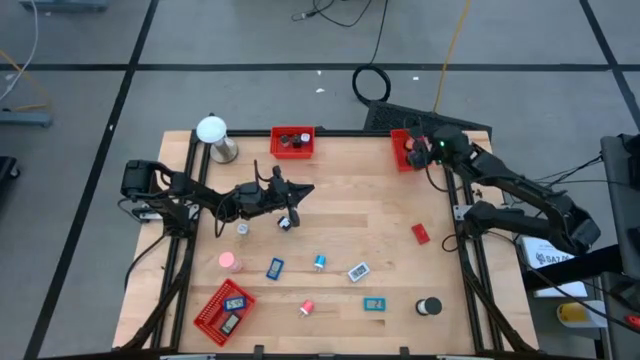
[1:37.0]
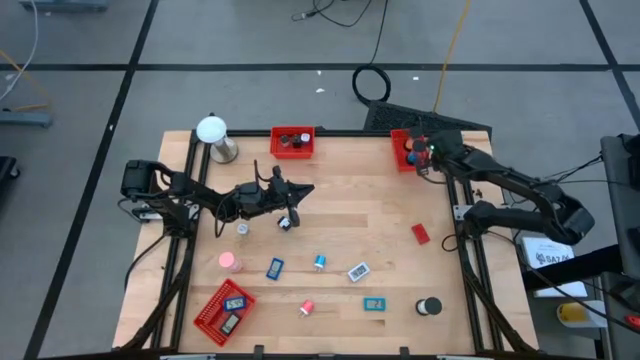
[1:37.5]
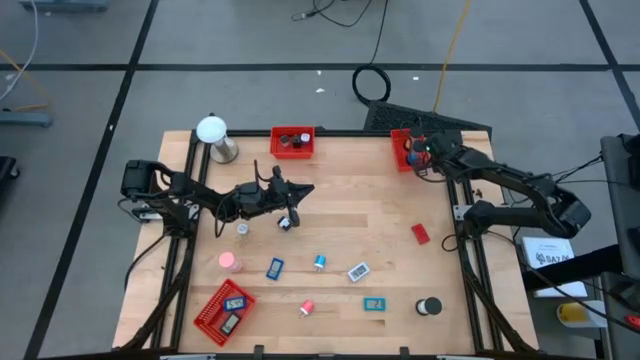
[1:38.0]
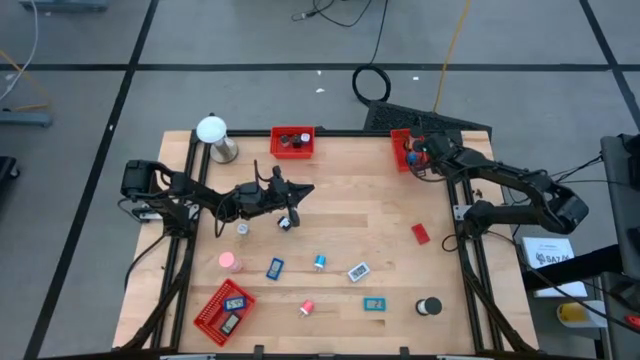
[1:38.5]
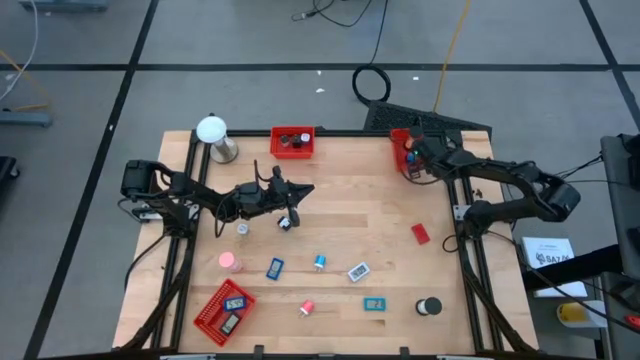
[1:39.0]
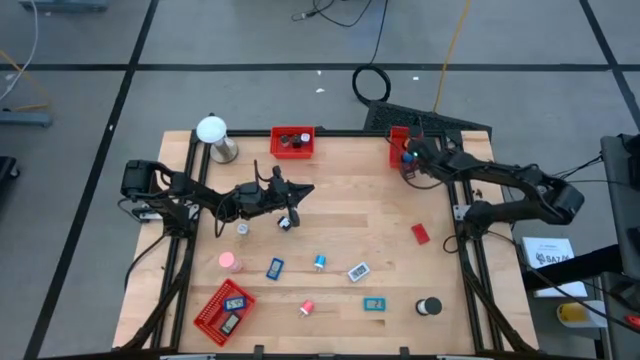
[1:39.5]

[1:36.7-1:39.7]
Task: Pick & Place Office items
Adjust the top right red basket

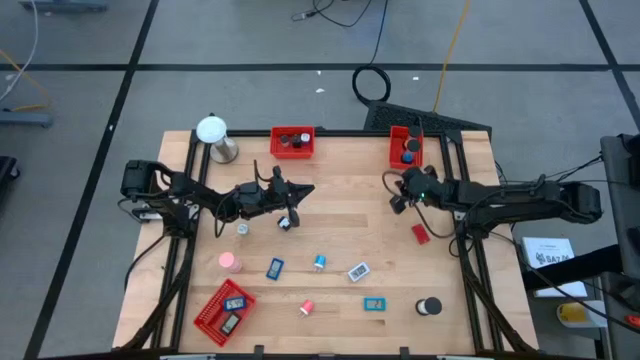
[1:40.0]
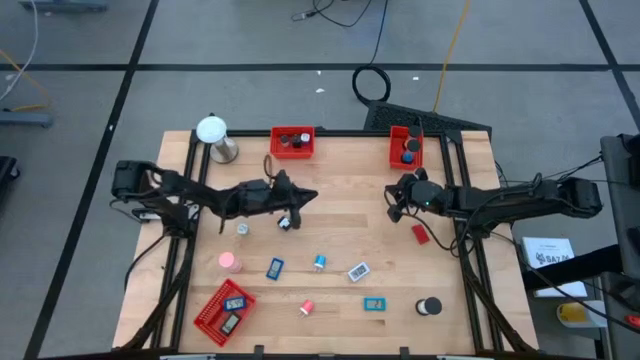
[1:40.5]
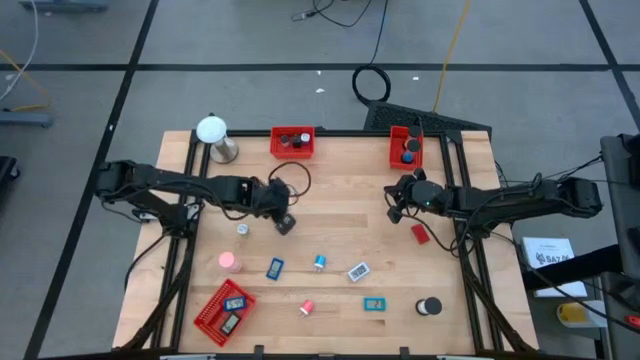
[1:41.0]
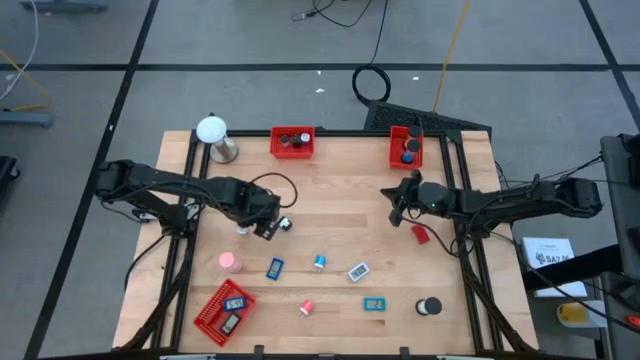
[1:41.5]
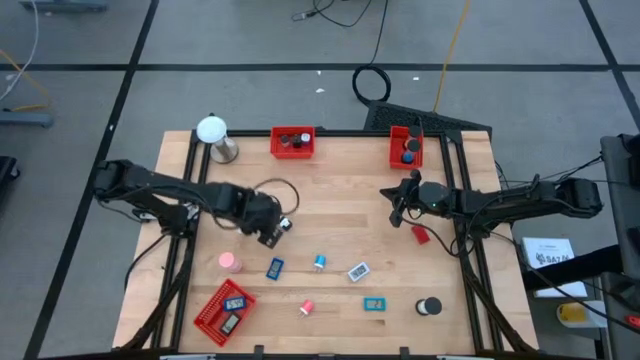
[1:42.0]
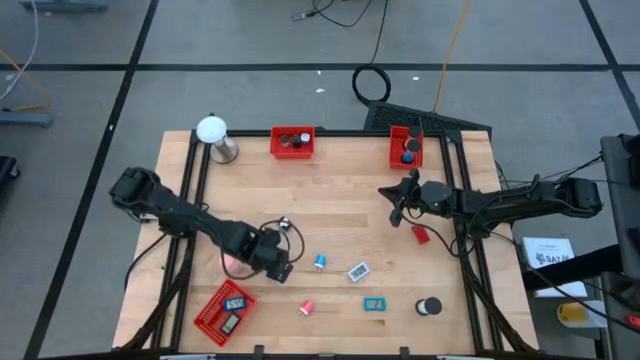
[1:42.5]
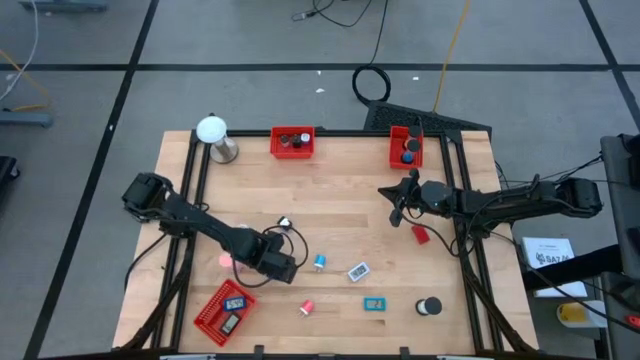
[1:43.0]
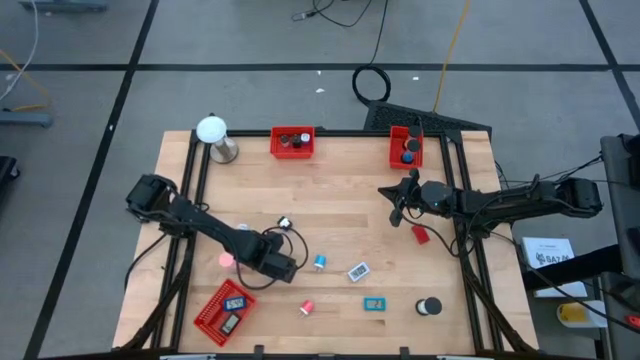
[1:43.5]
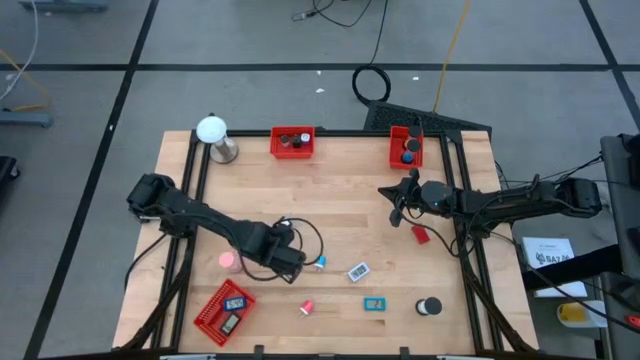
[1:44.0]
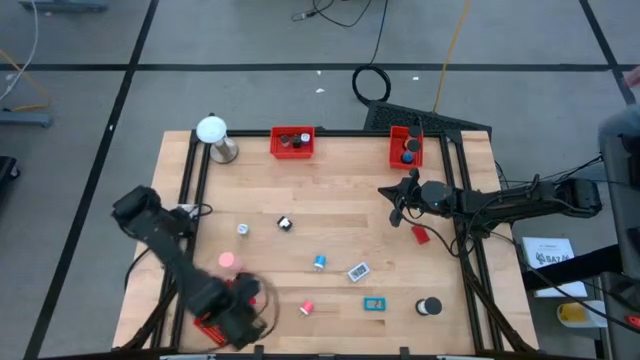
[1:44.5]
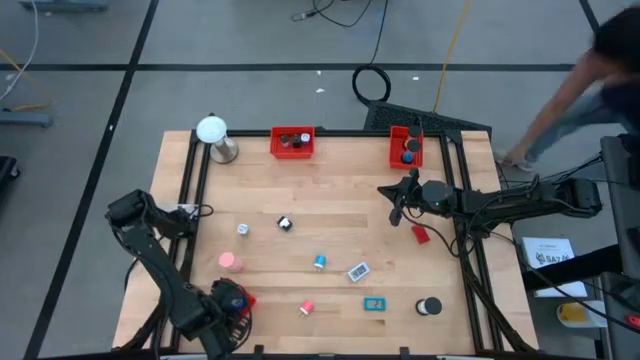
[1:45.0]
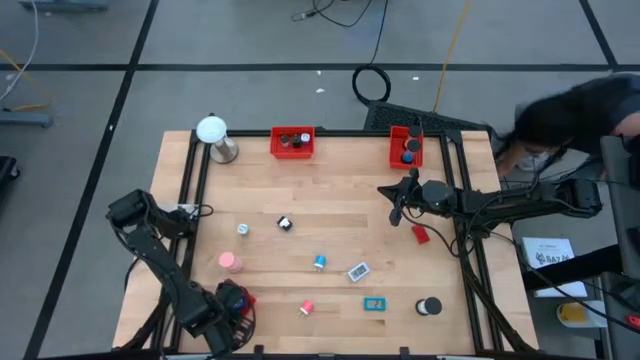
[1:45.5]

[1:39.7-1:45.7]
Put the dark blue timer into the bottom red basket

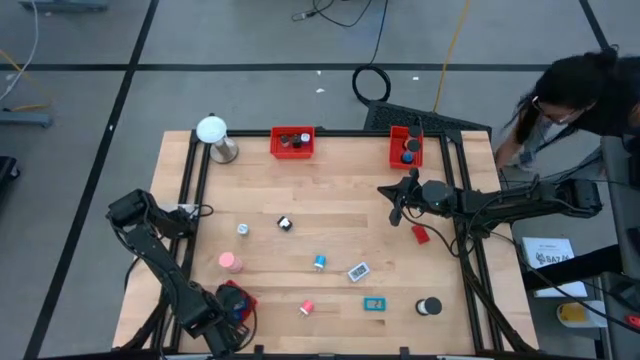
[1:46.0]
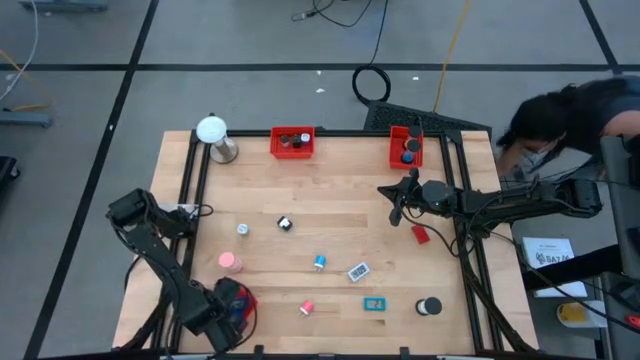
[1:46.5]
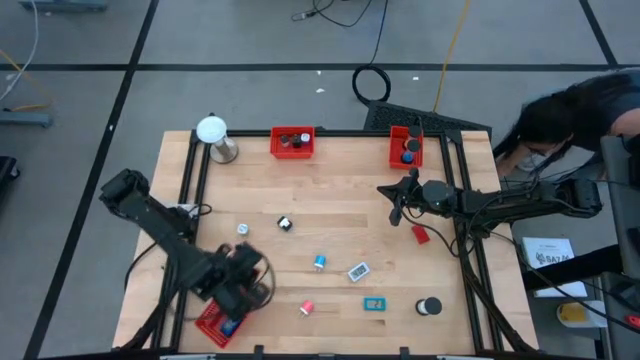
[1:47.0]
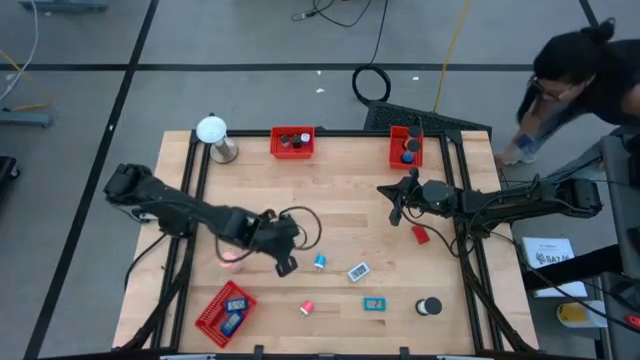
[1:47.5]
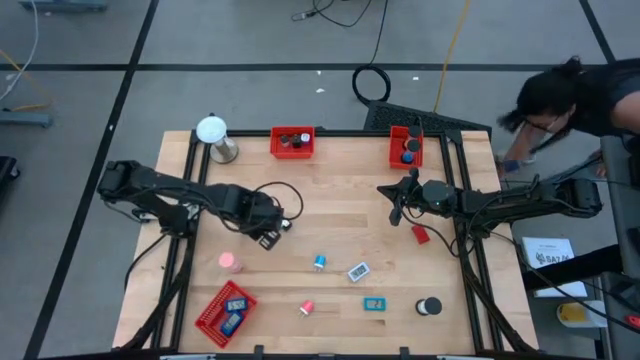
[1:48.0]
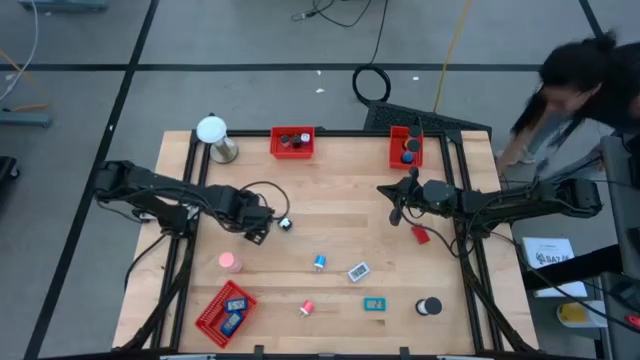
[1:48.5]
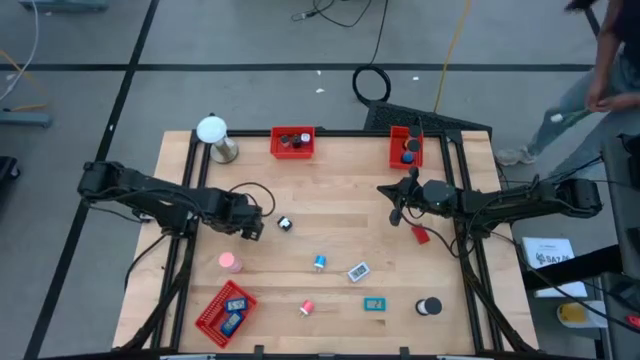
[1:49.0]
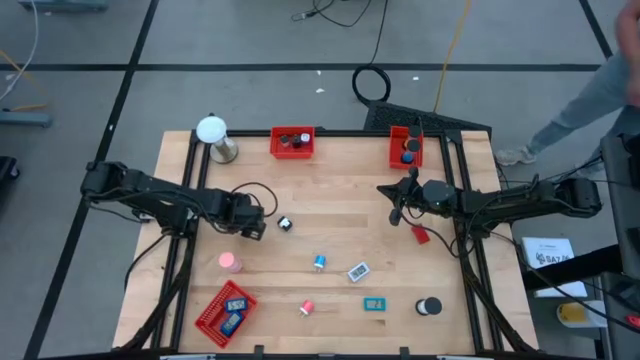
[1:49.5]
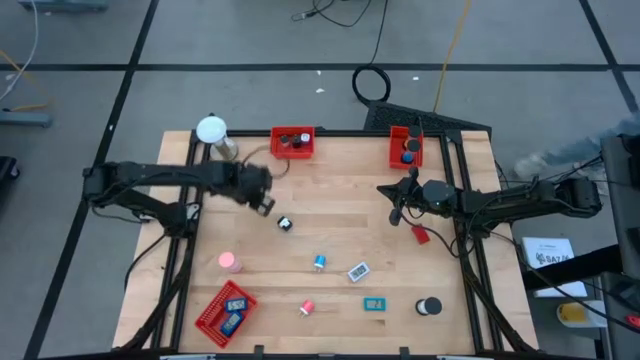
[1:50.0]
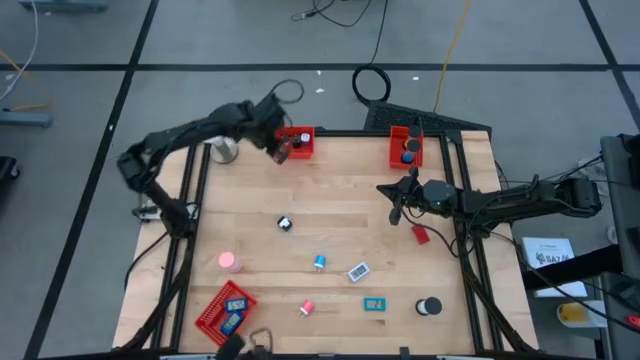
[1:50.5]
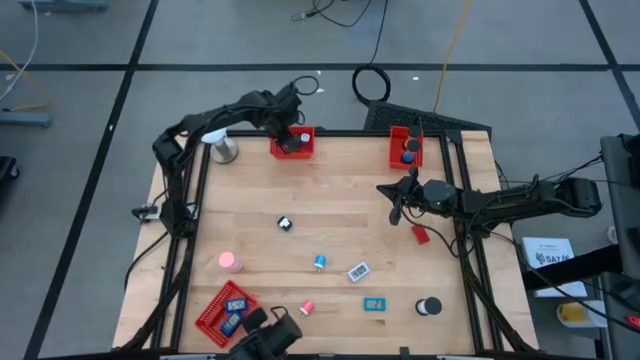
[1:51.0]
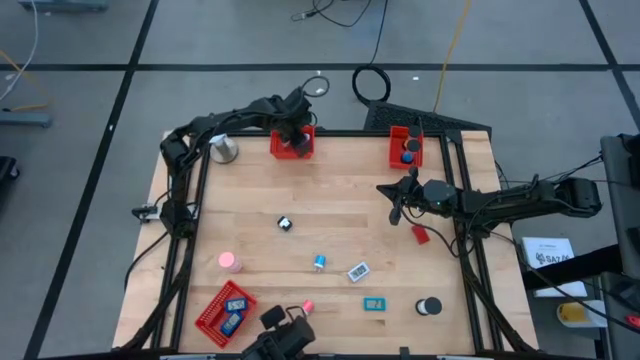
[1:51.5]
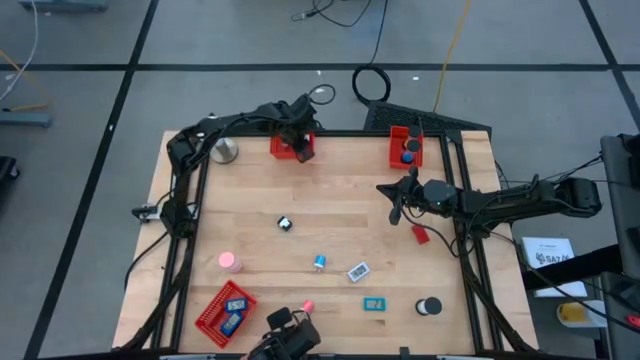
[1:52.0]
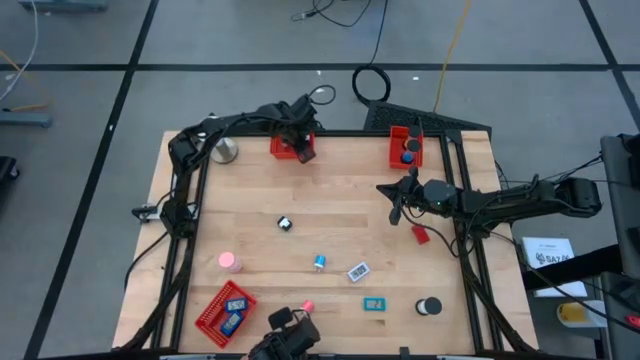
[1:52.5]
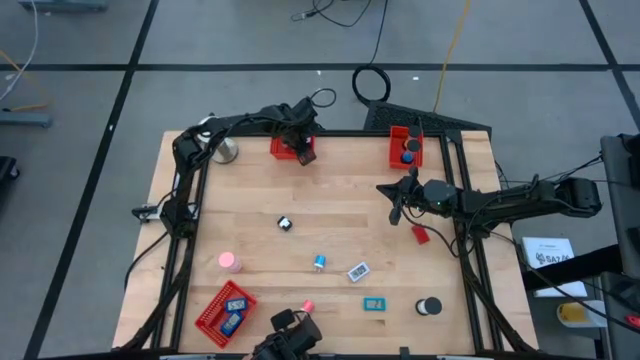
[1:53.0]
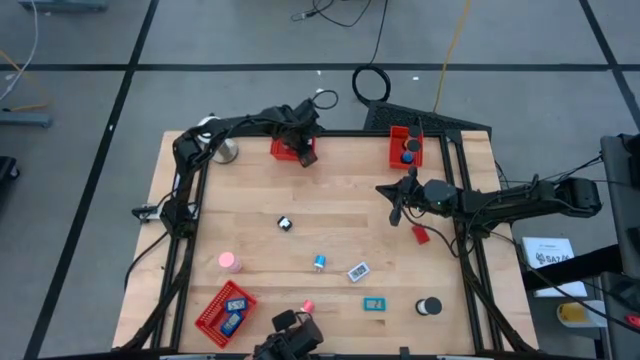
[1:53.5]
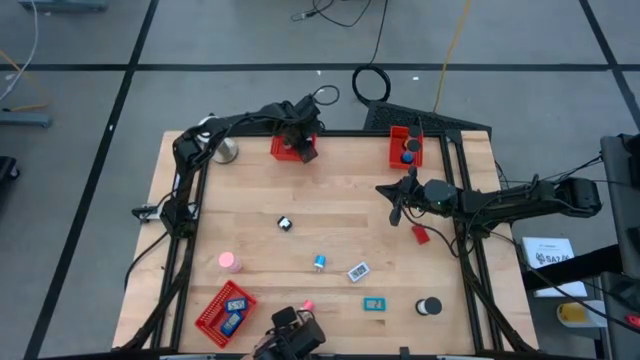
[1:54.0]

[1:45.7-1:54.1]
Put the green charger adapter into the top left red basket

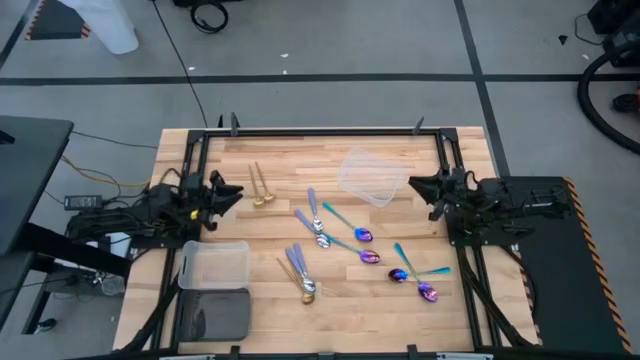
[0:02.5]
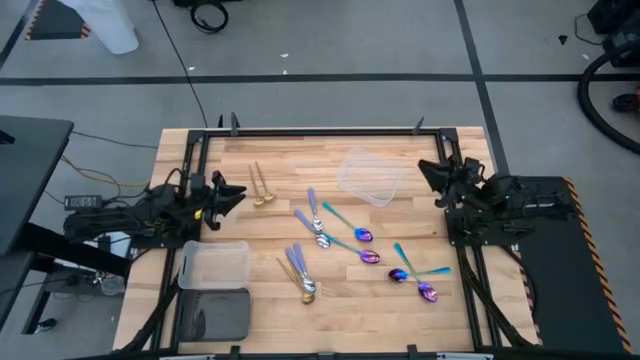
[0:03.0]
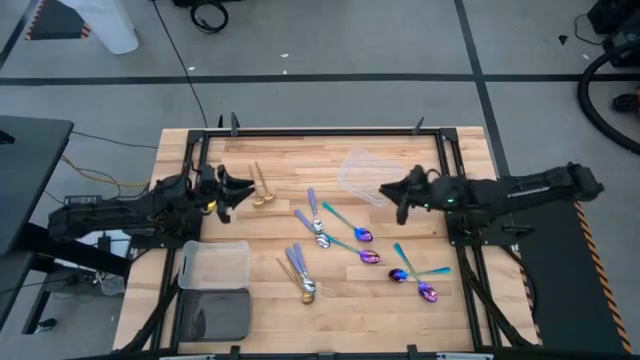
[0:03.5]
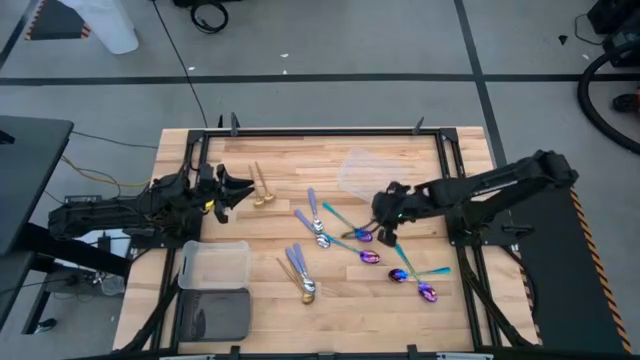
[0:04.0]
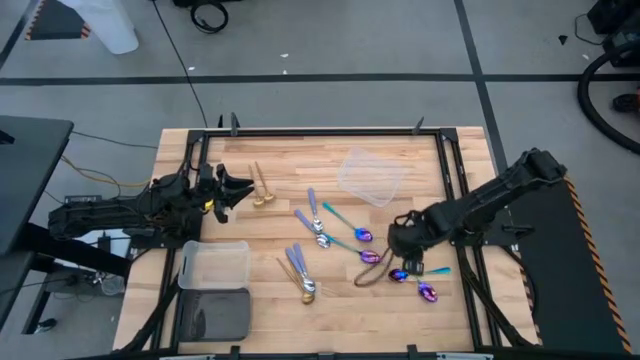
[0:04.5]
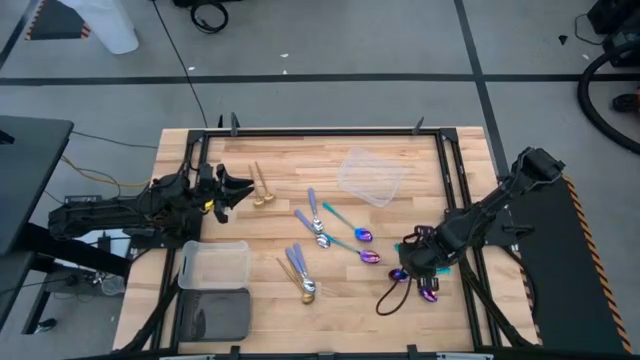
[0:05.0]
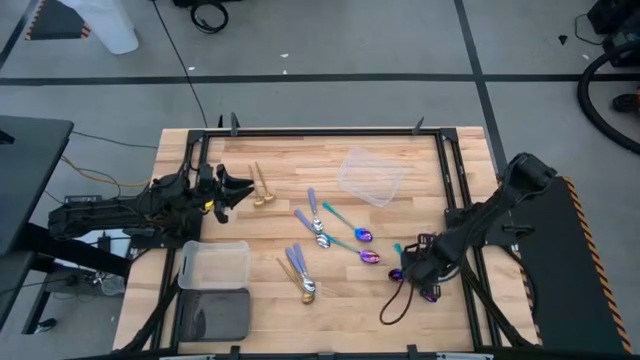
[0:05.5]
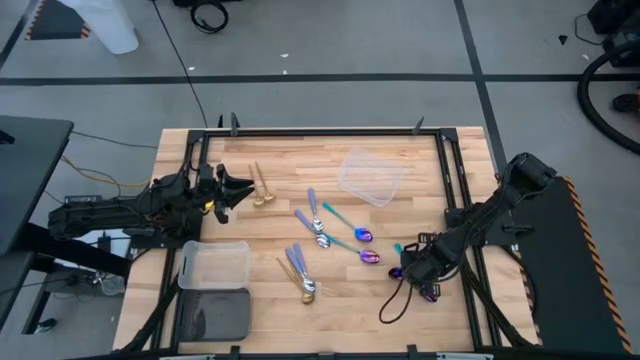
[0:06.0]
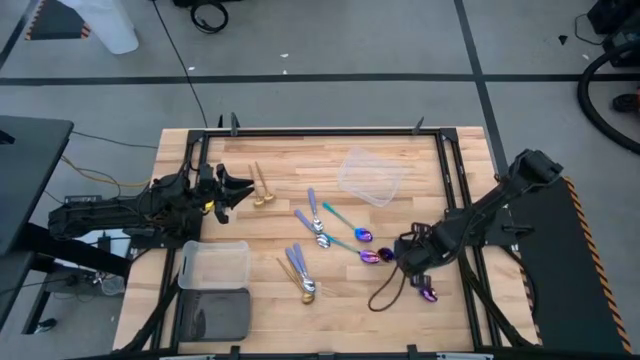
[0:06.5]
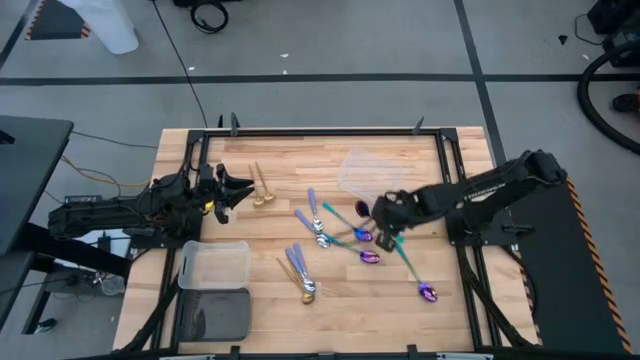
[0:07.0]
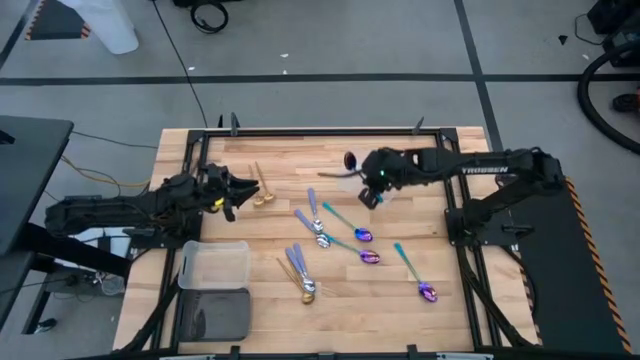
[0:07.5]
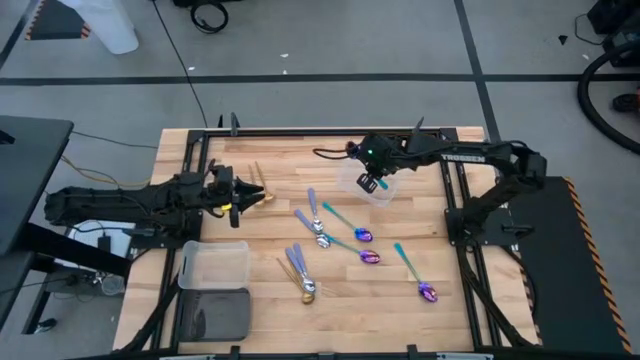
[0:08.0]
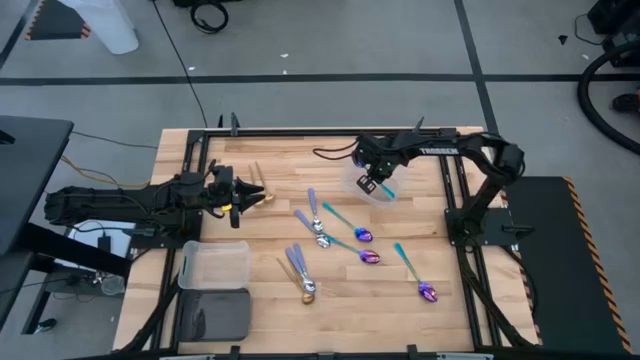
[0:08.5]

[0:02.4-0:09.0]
Task: Sort silverware by color (type)
Put the blue spoon into the top transparent bin
